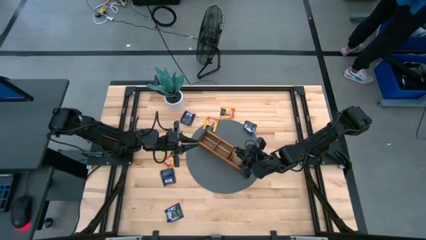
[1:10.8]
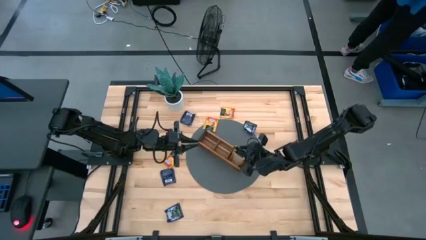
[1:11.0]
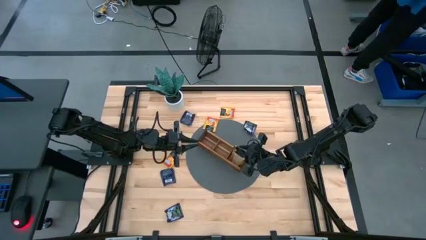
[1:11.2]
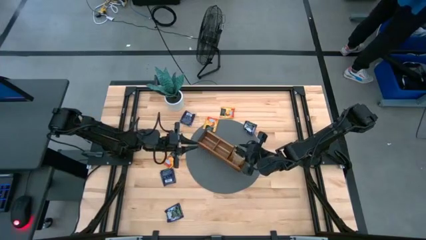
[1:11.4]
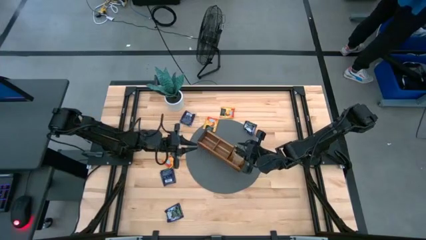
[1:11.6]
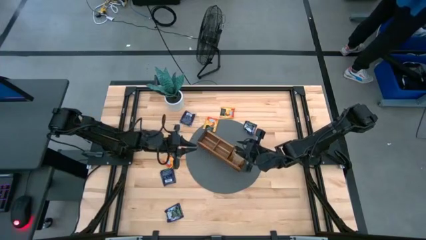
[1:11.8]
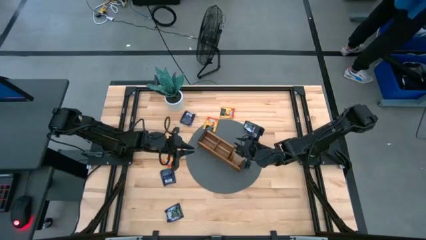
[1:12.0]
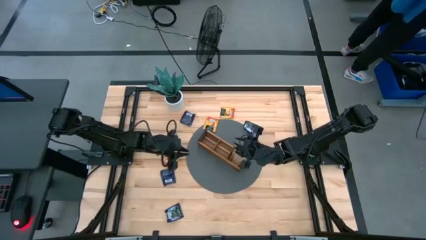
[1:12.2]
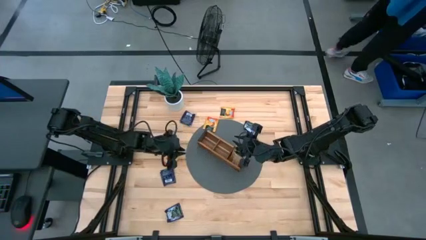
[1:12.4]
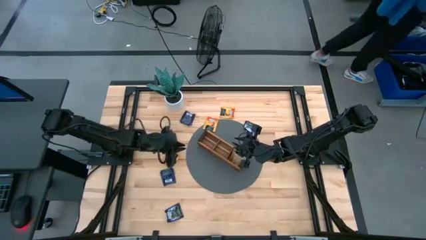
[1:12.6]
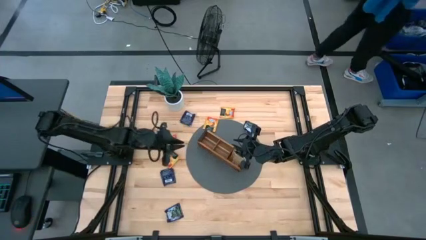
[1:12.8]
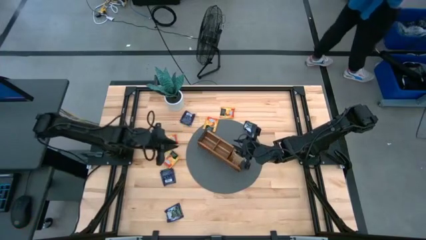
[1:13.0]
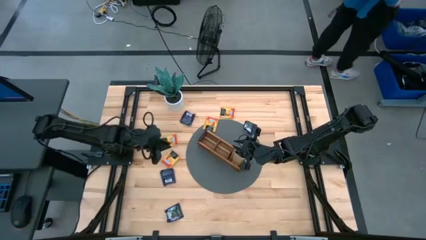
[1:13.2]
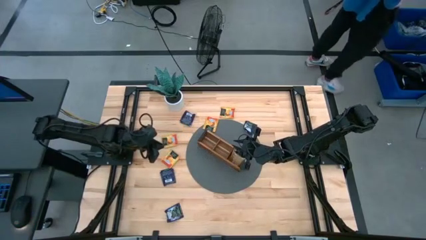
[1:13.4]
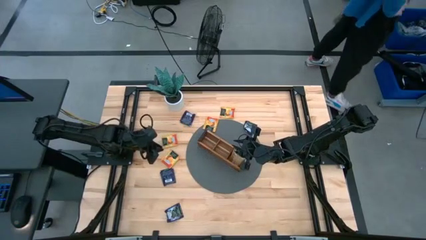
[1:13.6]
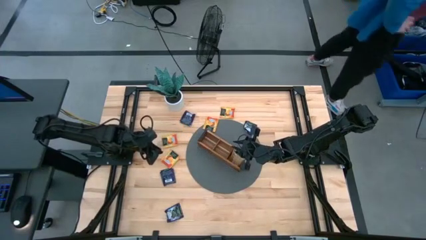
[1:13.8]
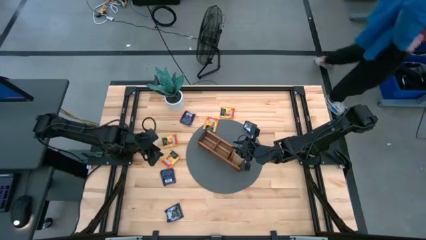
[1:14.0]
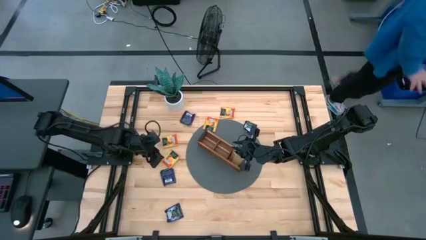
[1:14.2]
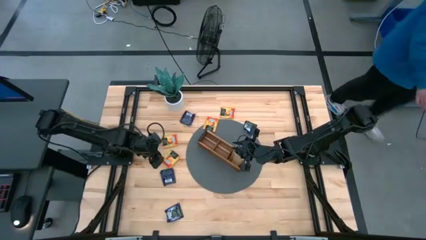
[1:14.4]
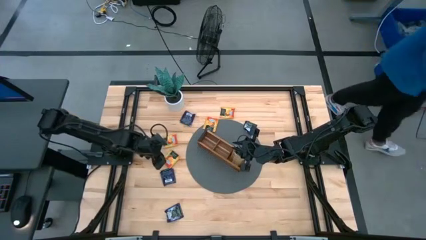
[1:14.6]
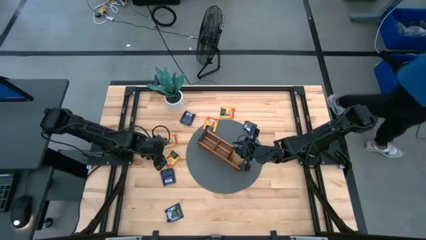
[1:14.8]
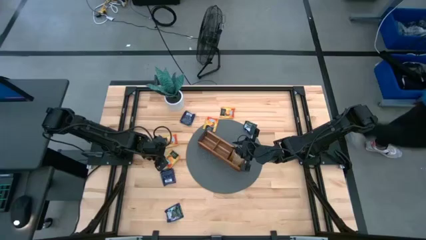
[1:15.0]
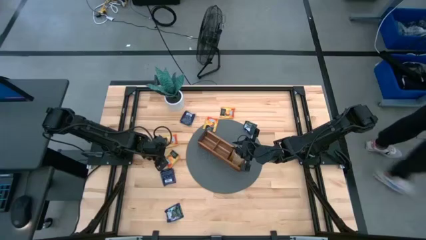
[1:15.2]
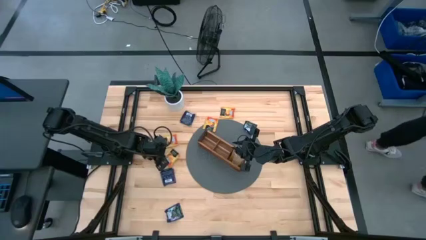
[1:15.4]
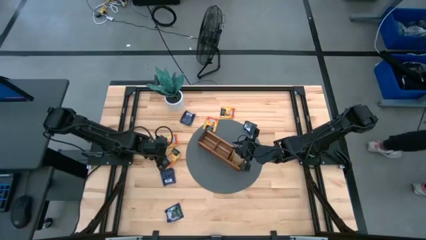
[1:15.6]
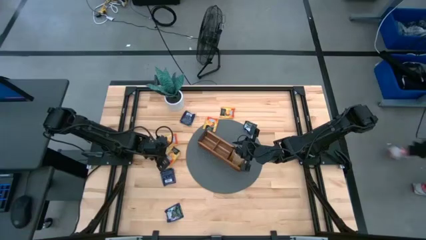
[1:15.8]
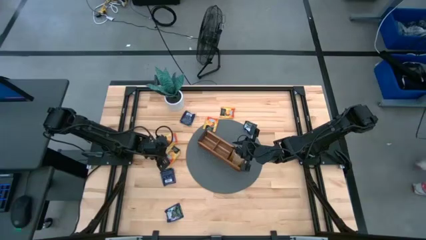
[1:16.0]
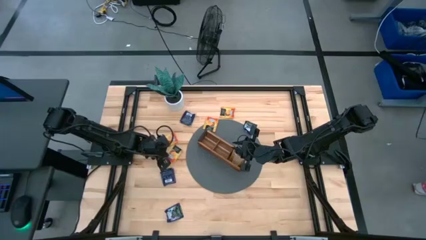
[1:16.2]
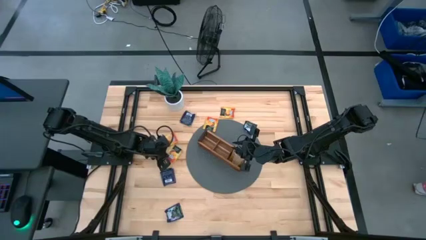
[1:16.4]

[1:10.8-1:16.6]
Task: Pick & Place Tea
Put the orange tea bag into the middle section of the wooden organizer

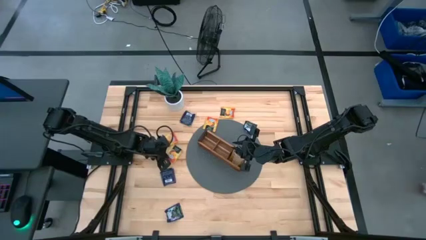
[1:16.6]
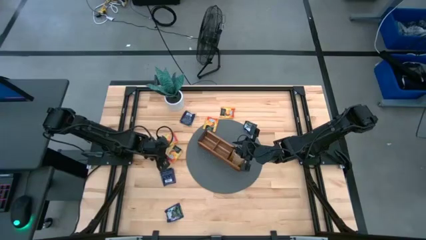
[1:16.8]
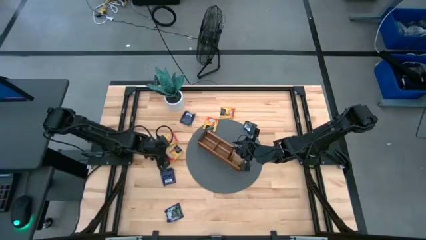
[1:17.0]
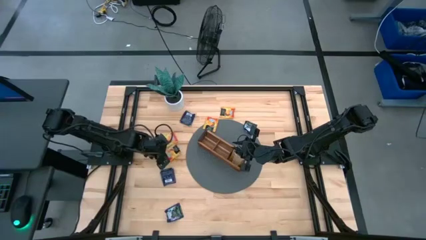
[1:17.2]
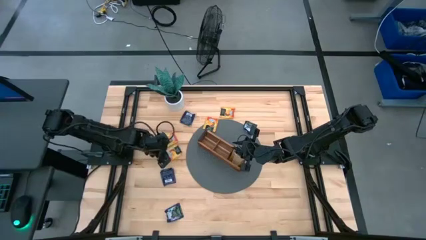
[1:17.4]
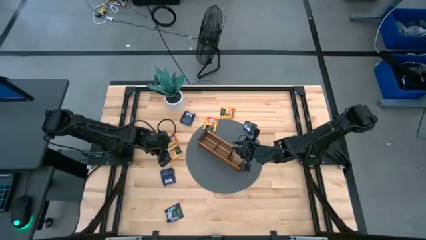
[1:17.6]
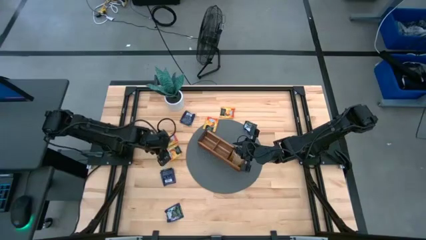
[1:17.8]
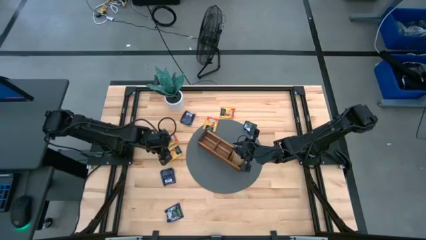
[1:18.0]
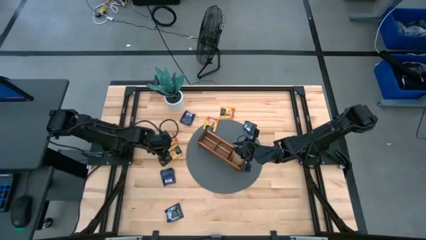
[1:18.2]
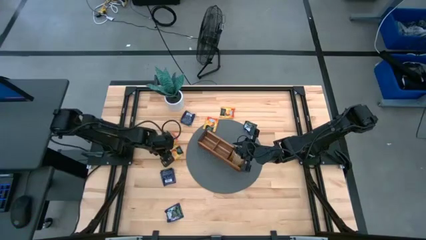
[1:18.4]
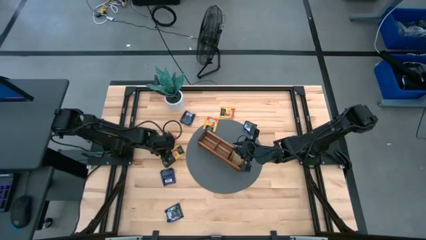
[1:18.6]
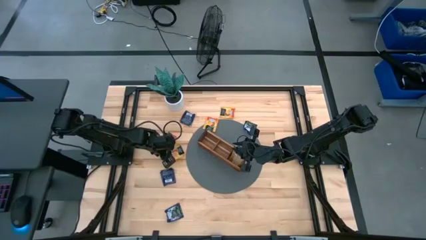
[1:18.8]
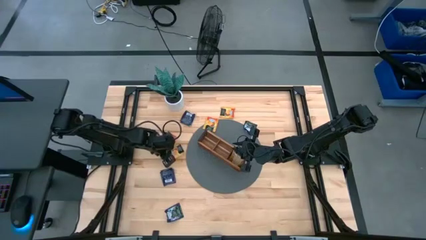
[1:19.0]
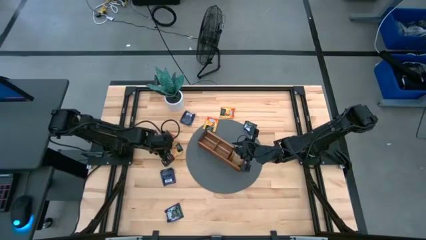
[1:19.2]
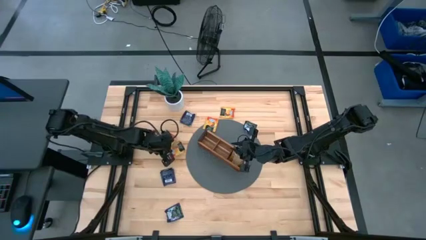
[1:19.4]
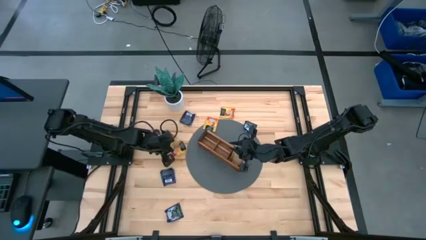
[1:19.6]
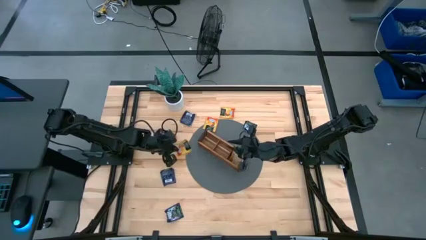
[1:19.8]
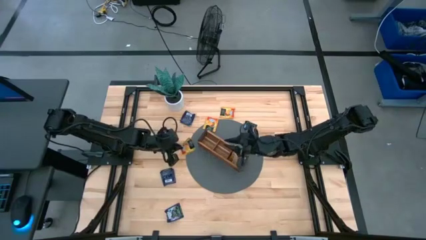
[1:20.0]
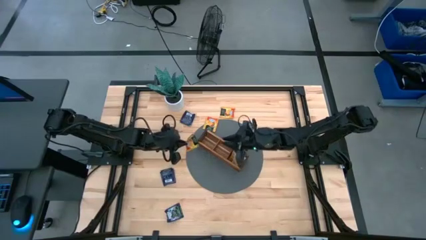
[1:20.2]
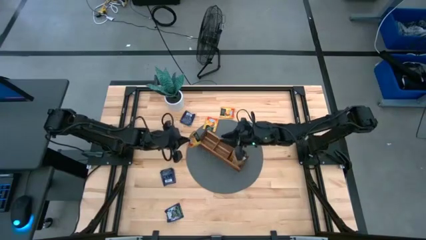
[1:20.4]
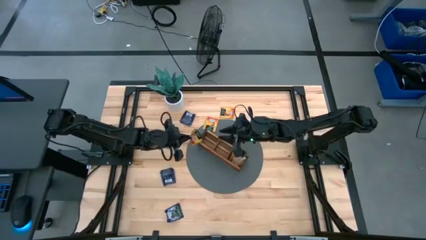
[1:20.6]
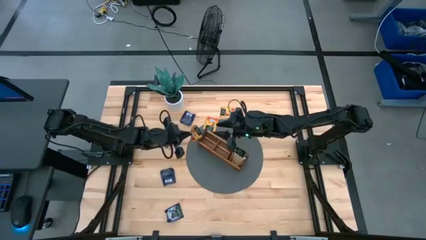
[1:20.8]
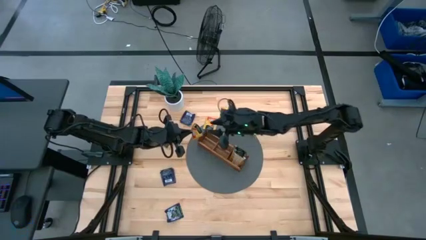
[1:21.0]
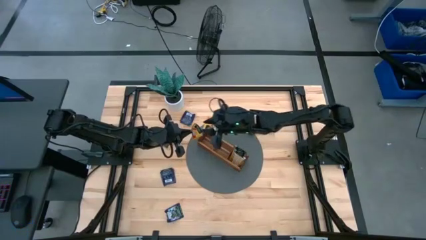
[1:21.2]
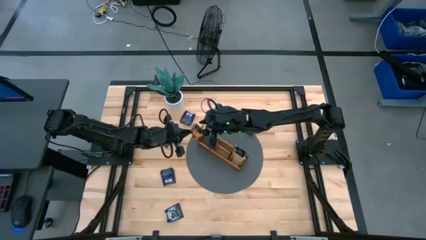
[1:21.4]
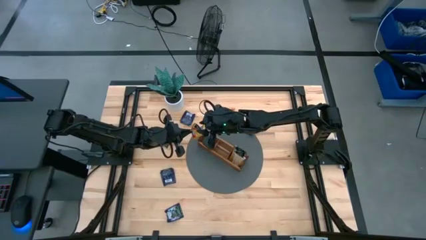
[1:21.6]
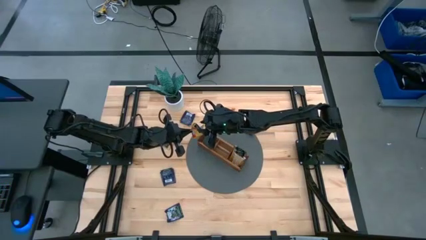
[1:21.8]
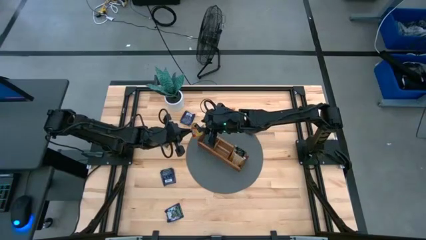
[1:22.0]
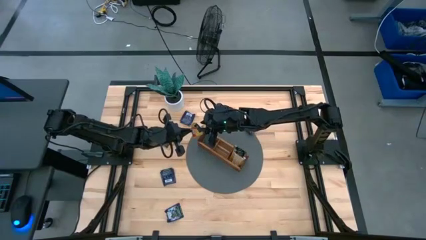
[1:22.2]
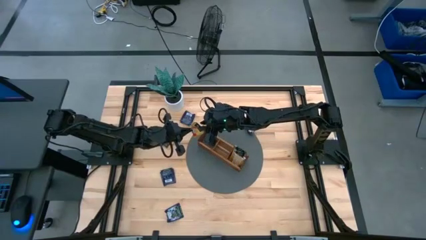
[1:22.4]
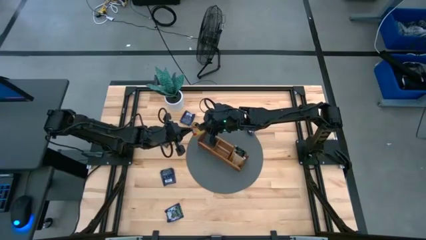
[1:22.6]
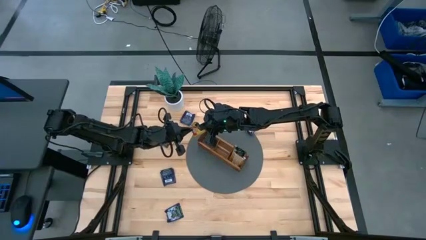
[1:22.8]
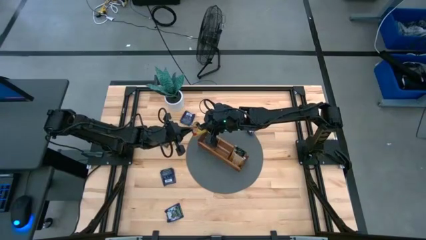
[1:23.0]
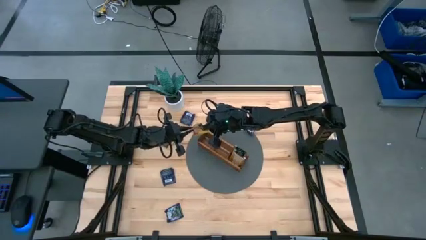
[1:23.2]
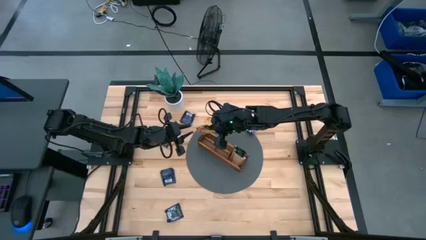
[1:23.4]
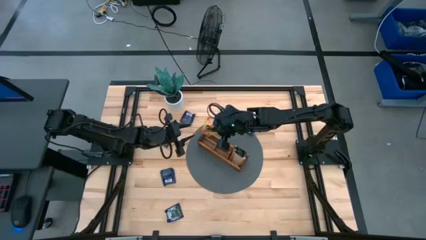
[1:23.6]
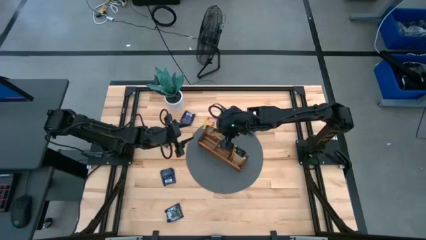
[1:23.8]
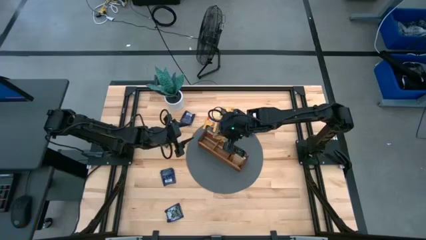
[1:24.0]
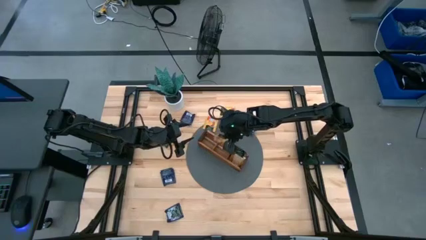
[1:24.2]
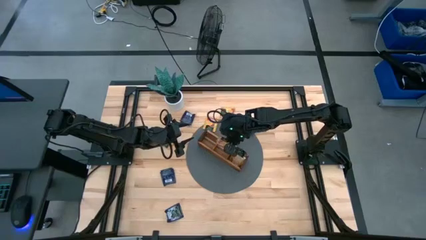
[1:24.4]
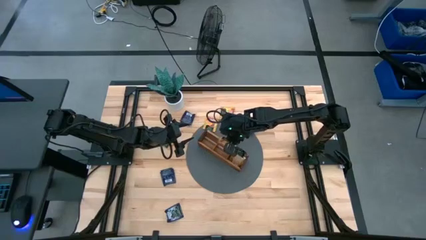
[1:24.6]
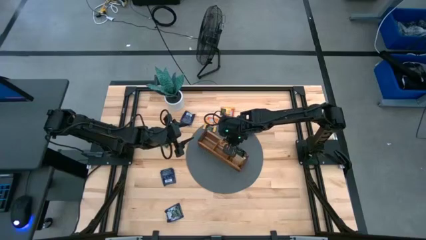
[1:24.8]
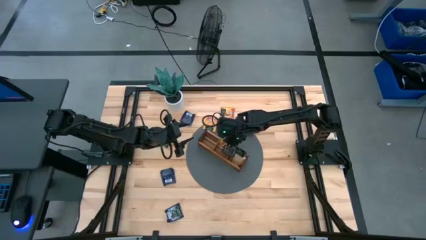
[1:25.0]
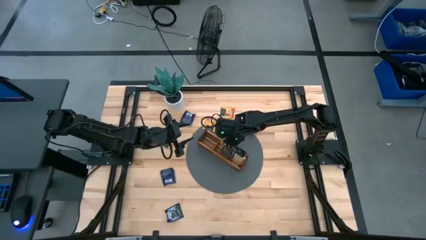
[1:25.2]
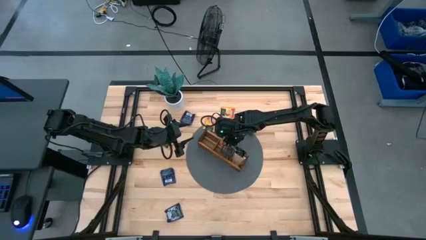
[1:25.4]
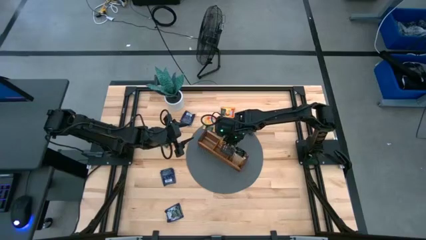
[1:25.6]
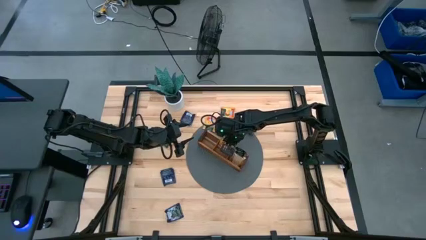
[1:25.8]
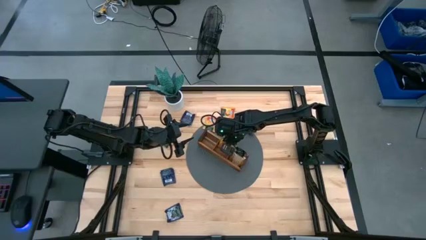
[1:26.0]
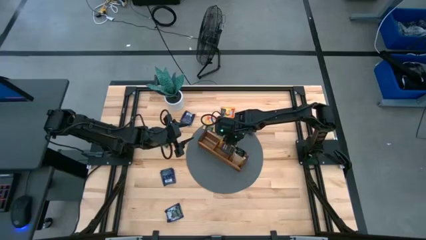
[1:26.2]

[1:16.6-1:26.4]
Put the orange tea bag into the middle section of the wooden organizer
